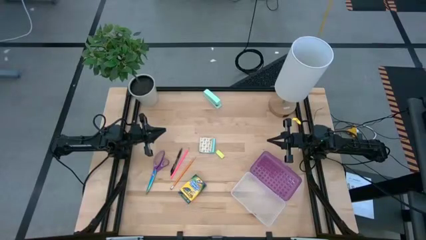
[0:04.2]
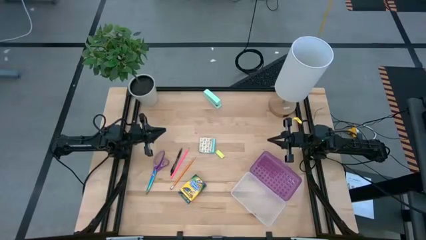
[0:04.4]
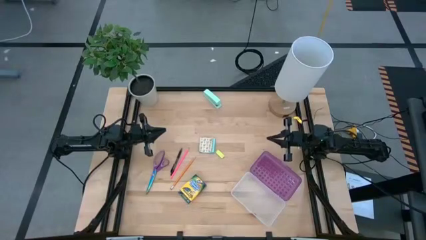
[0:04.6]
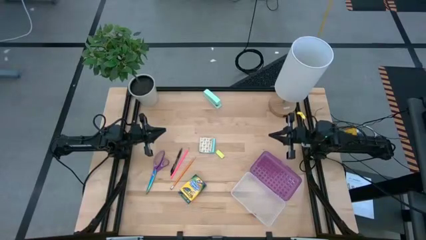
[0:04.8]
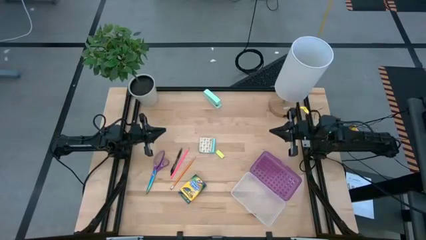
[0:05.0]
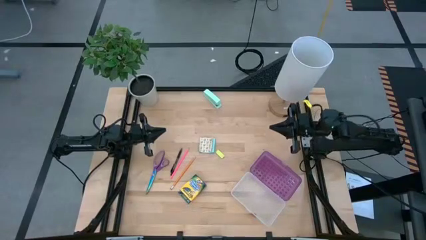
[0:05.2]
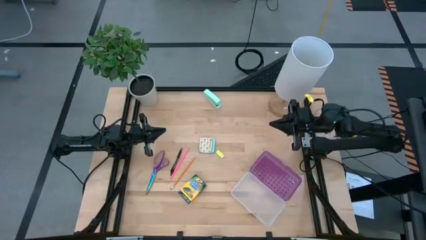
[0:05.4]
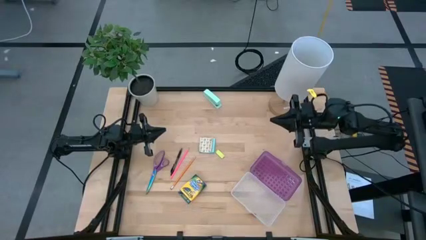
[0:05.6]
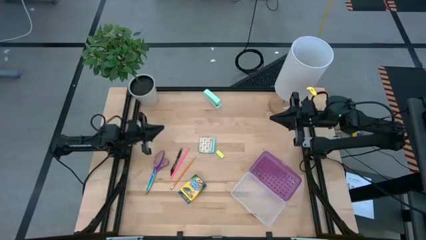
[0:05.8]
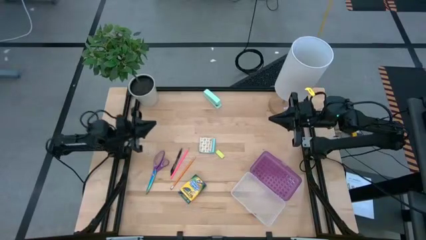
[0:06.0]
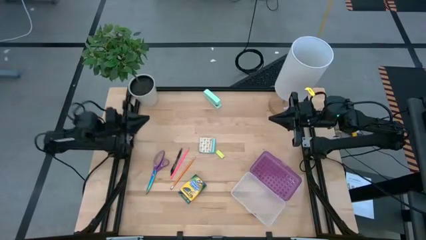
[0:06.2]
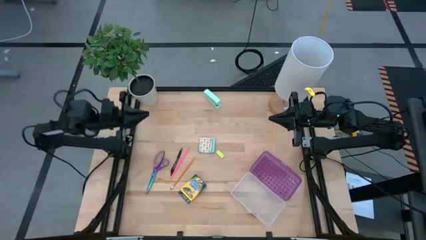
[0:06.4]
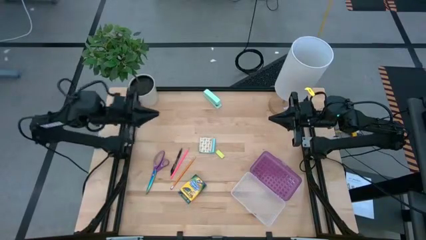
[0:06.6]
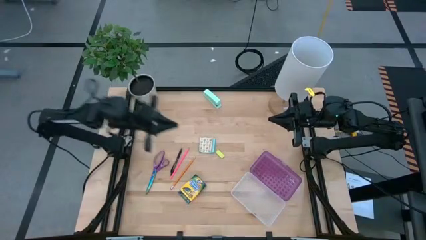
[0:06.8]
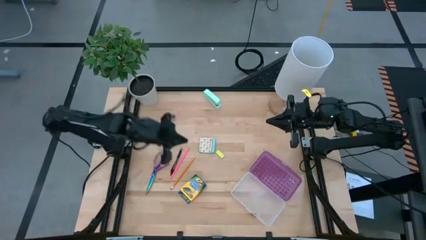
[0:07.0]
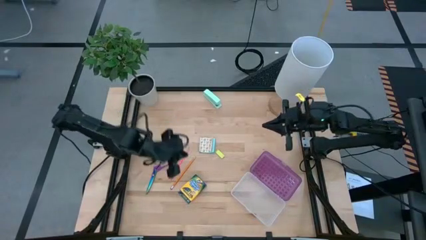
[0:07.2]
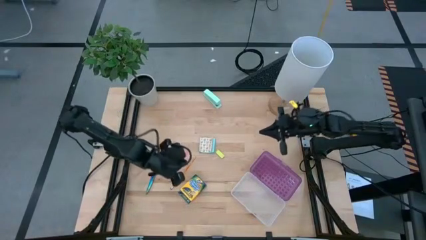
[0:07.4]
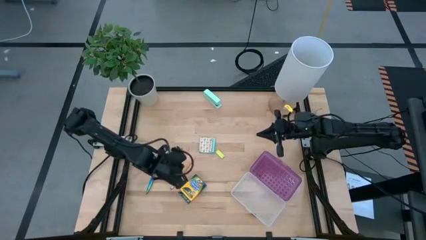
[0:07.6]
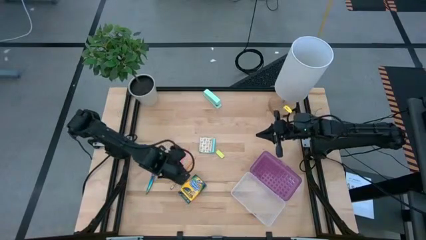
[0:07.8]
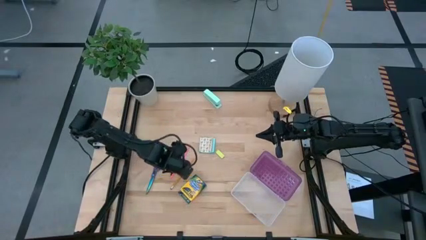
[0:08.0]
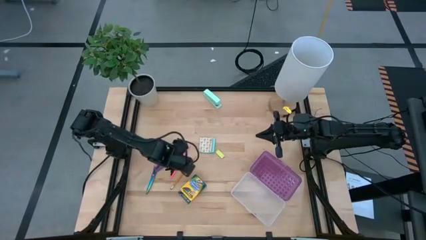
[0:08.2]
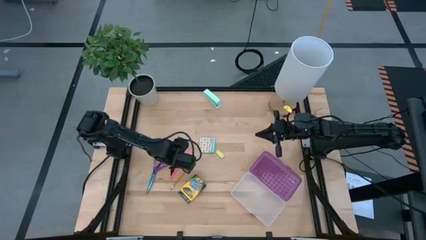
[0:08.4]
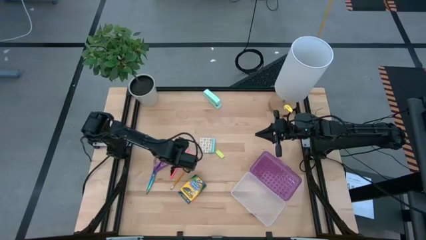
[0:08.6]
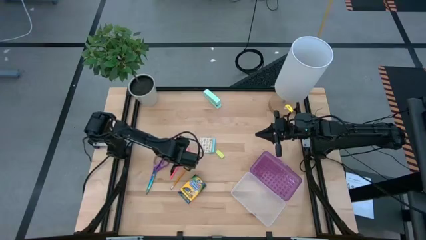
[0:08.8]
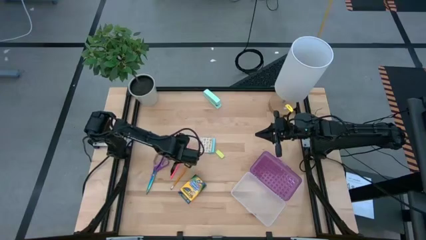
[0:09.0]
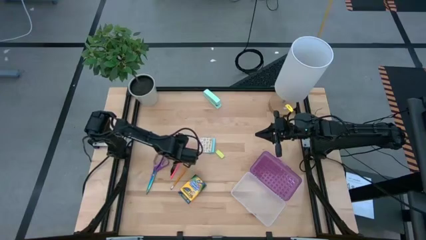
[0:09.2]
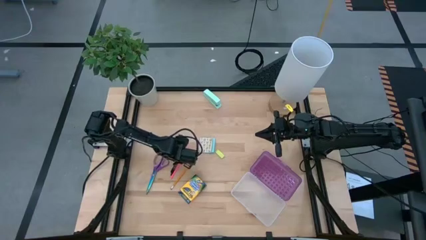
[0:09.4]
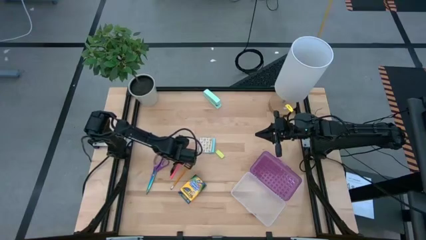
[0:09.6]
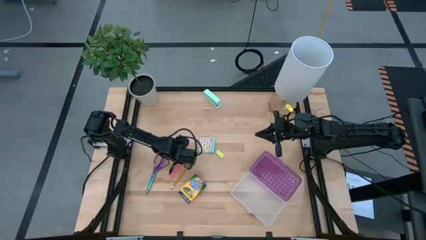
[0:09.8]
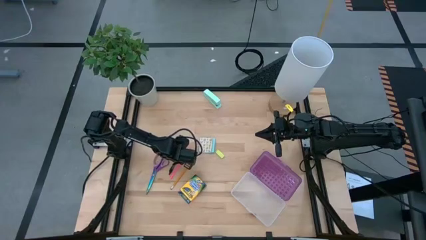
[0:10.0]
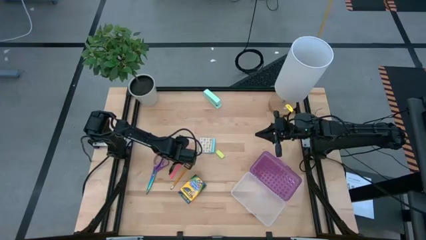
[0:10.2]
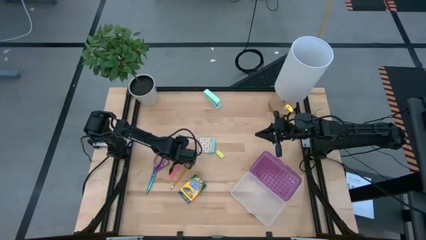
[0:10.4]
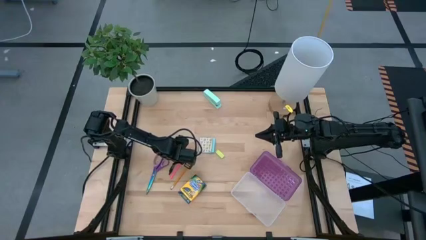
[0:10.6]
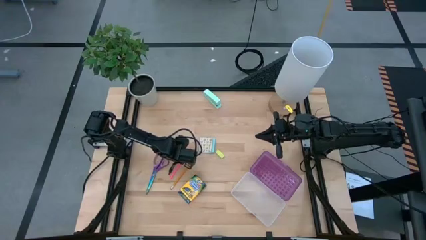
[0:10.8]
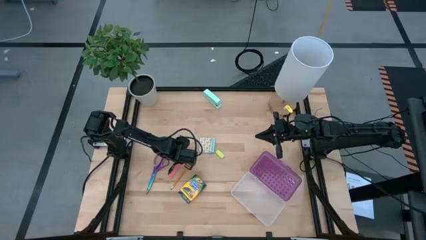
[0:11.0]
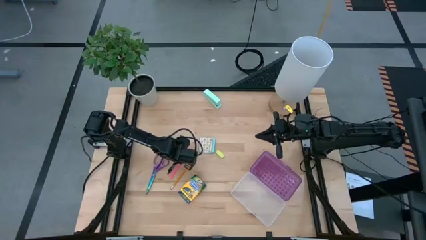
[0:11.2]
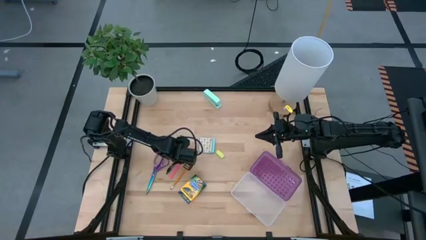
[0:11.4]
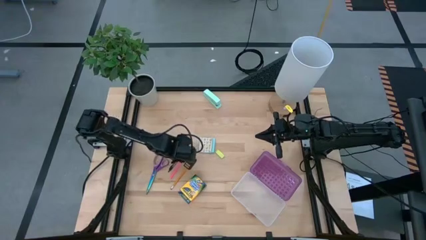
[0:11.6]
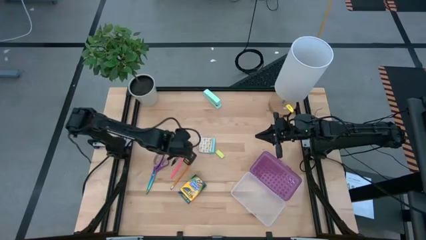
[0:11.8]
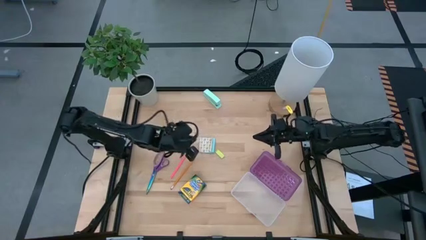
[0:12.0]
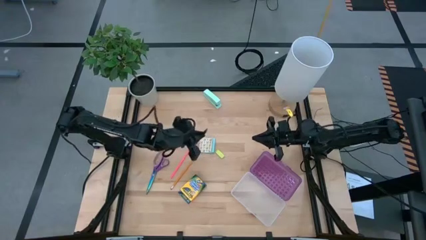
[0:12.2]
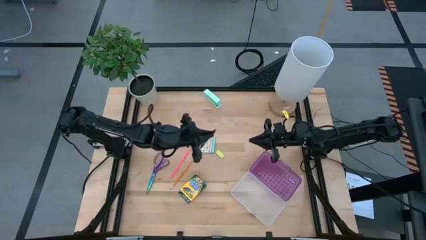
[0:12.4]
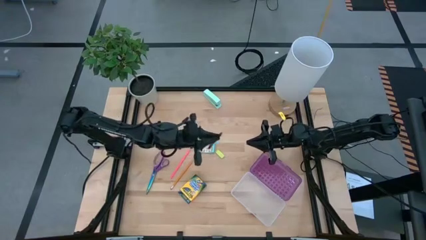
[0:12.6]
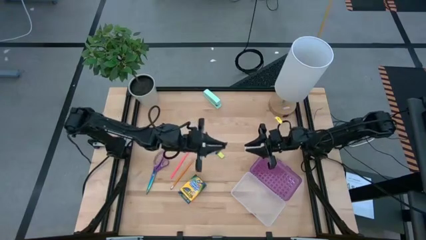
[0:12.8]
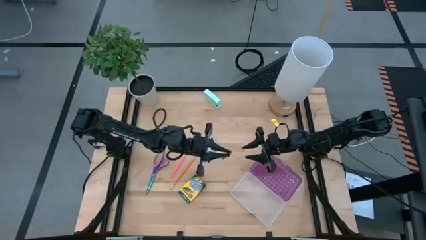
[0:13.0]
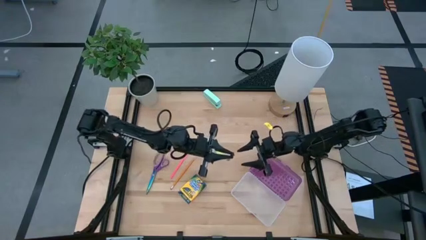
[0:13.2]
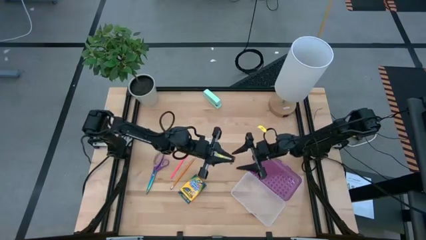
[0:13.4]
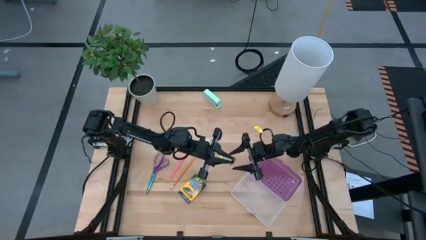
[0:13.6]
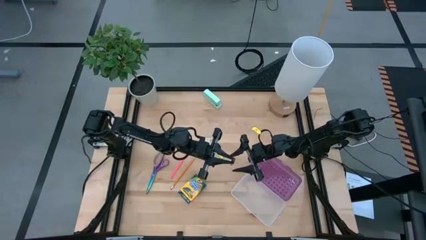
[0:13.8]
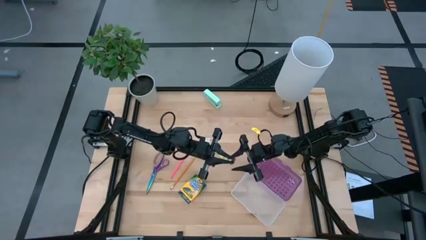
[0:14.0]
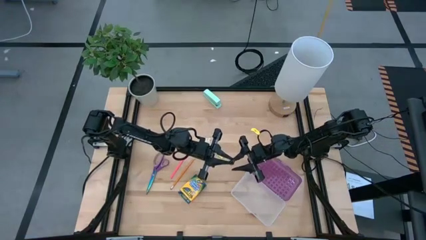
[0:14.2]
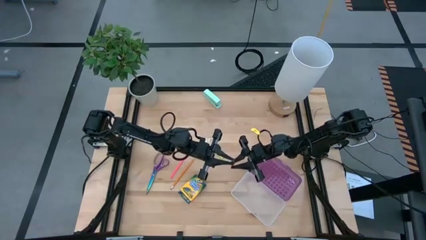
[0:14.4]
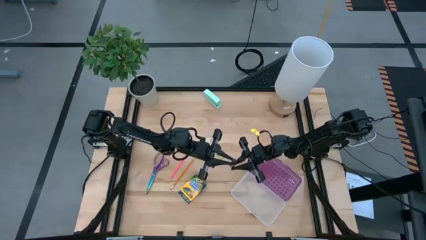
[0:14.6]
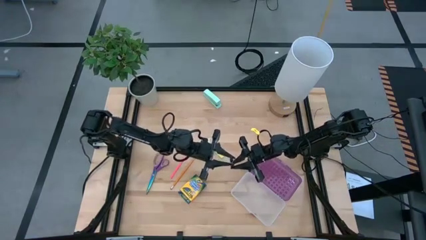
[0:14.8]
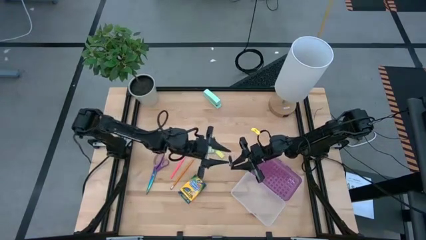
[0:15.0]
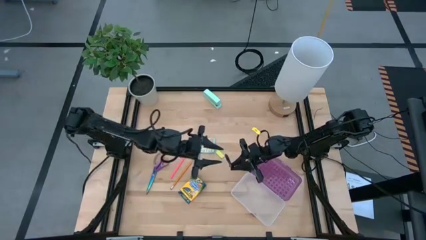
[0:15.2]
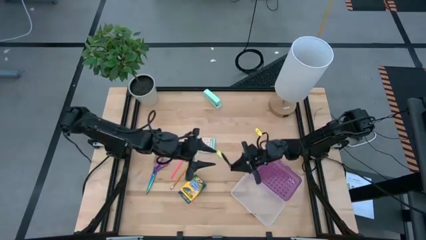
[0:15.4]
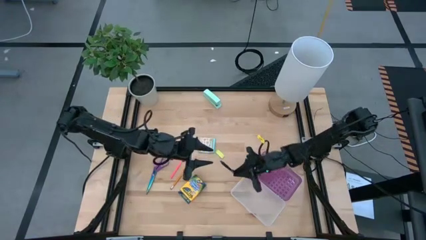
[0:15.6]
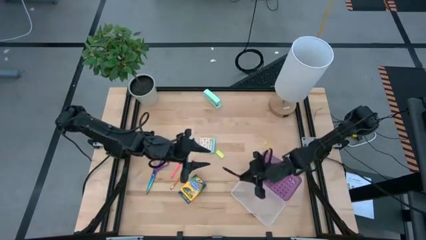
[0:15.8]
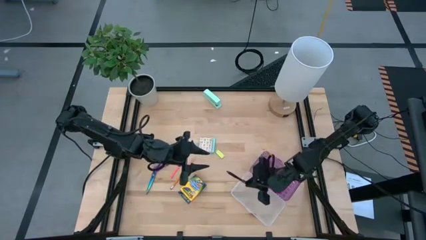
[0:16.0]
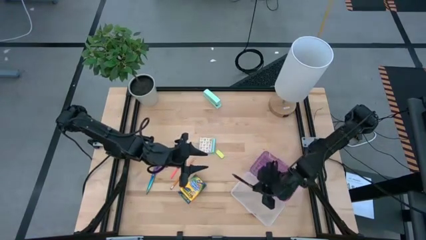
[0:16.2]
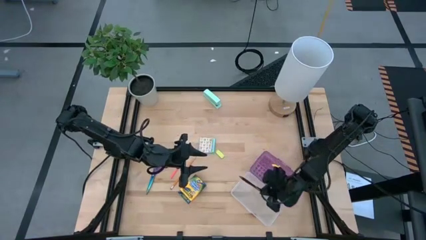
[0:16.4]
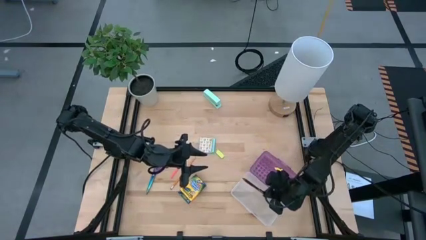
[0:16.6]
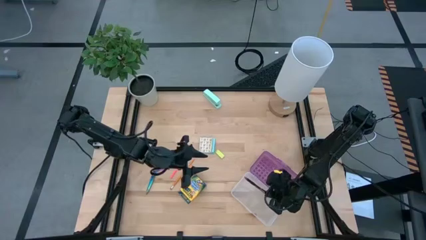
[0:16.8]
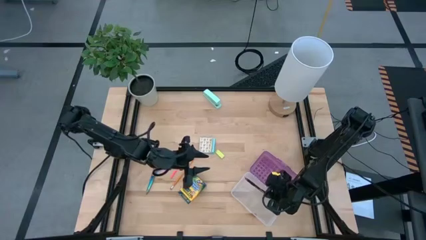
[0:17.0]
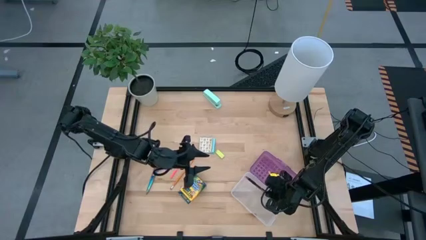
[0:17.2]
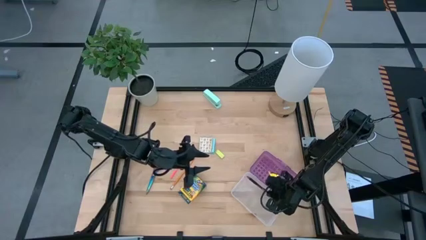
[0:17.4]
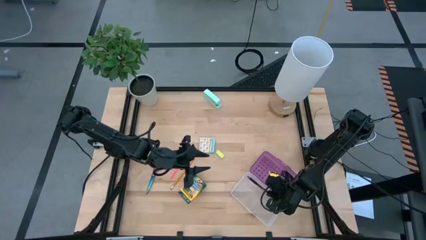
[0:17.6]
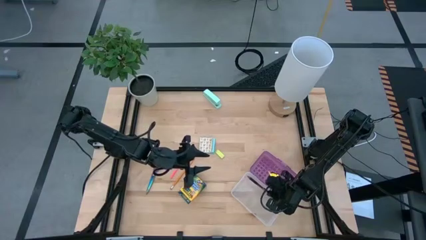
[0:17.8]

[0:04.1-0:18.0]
Task: Pack school essentials
Put the black pen into the violet supply box
